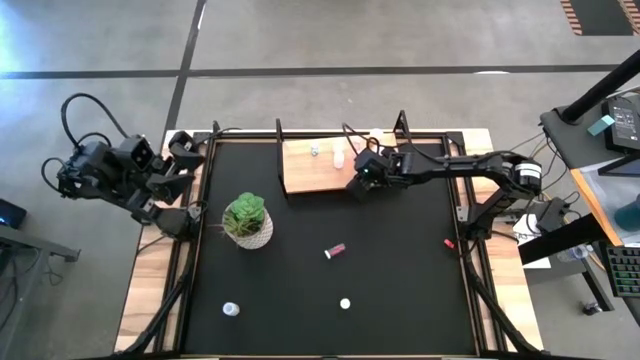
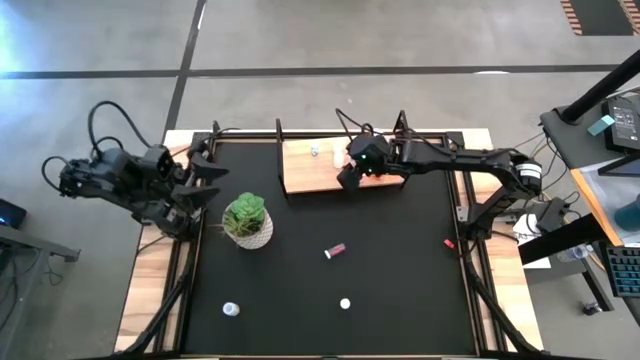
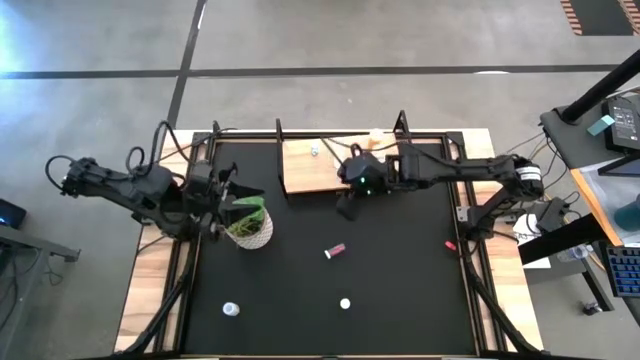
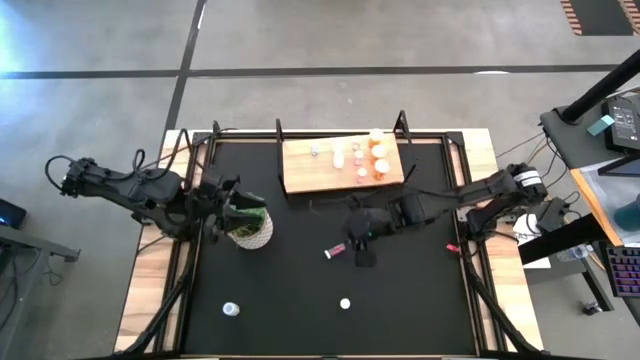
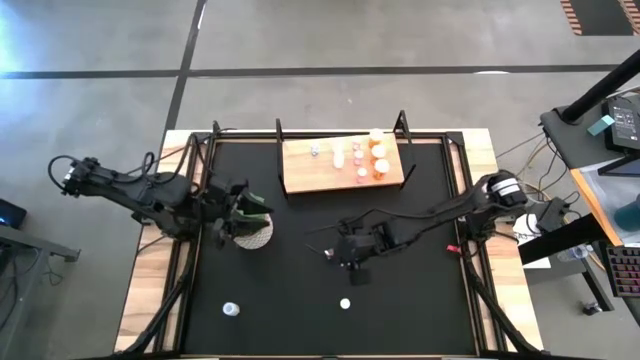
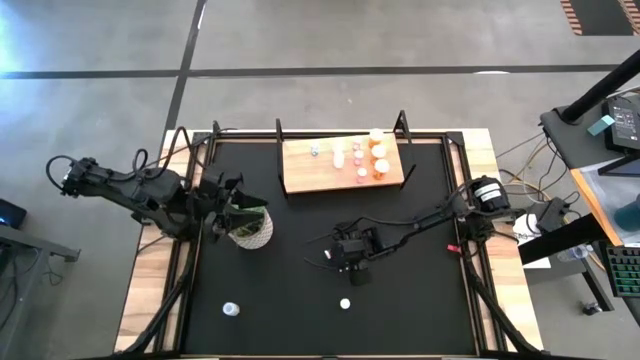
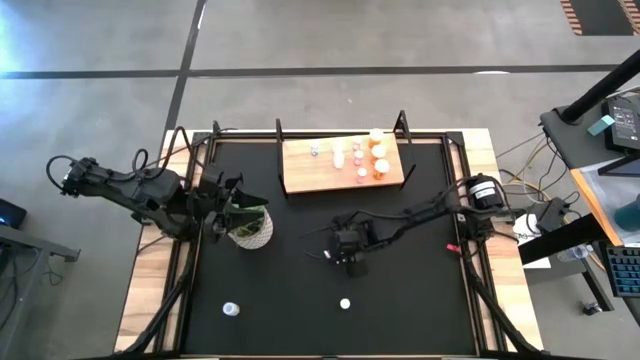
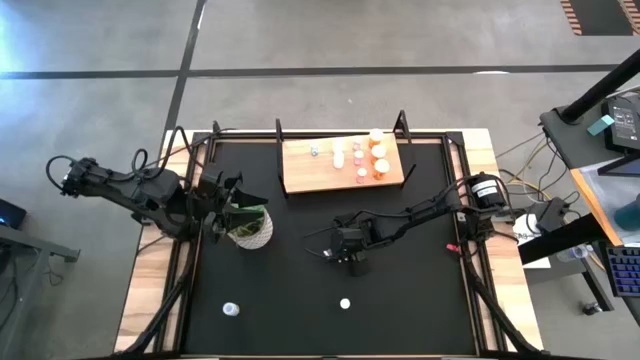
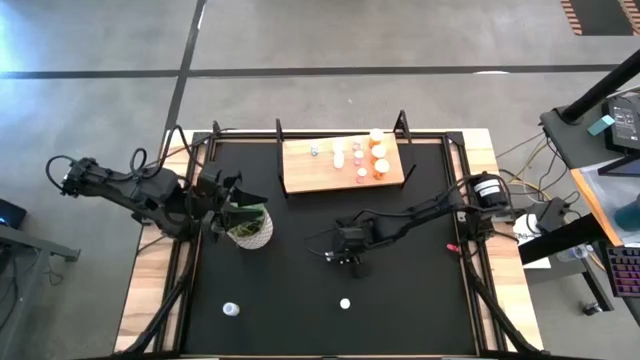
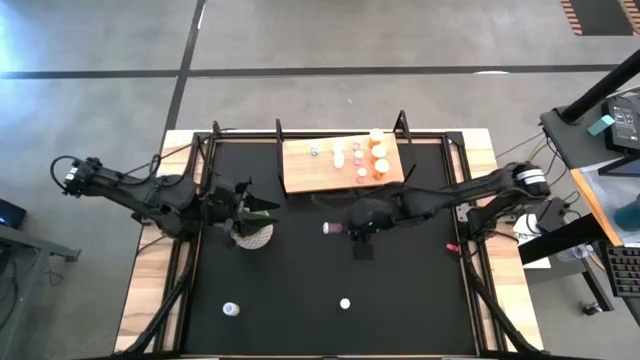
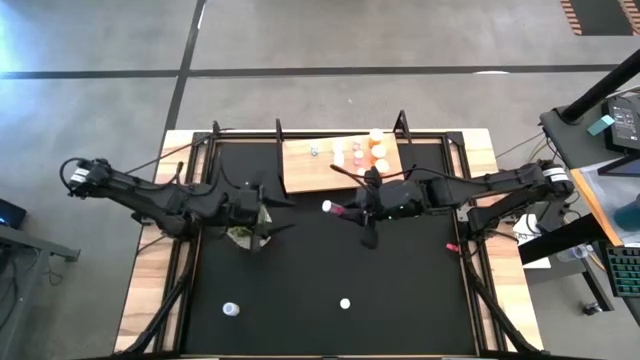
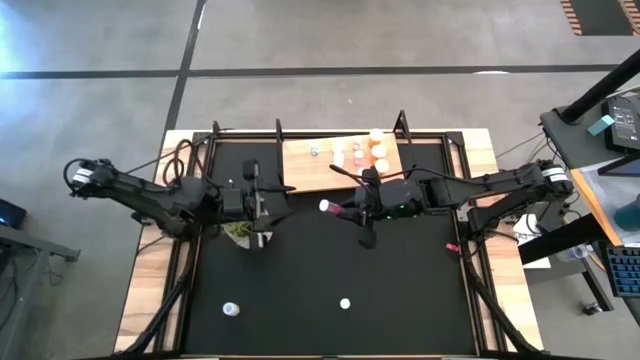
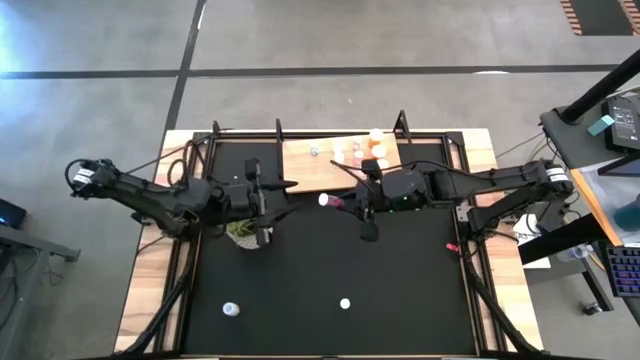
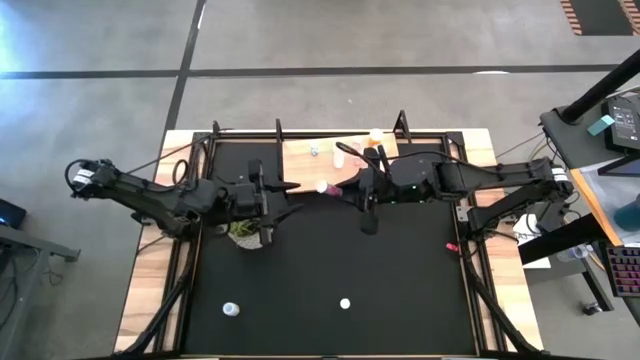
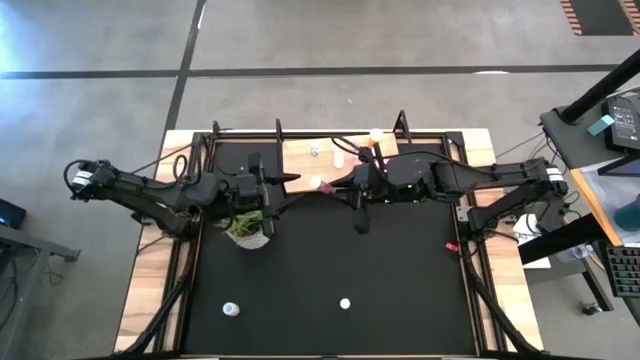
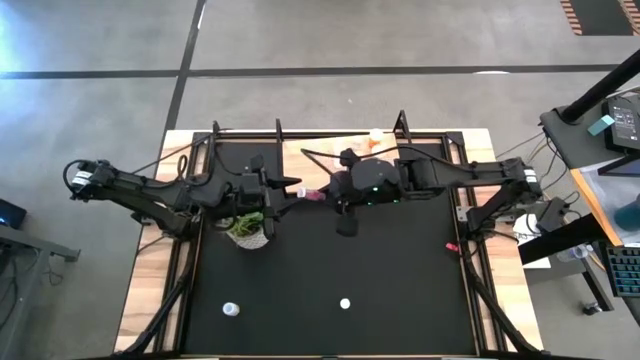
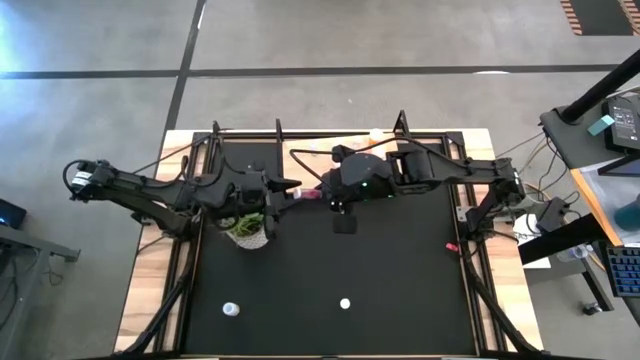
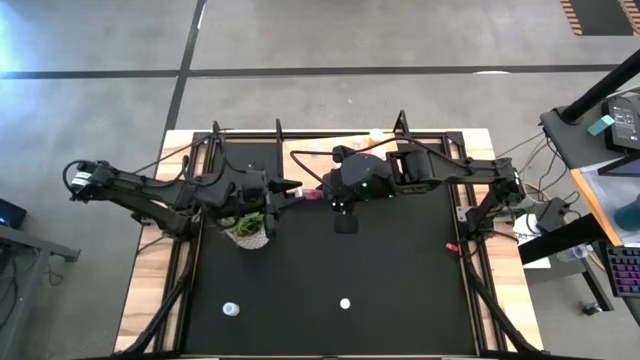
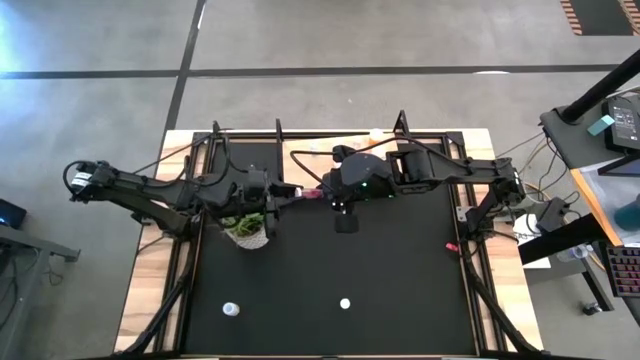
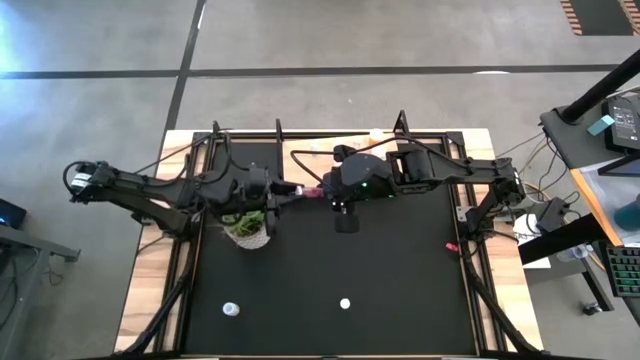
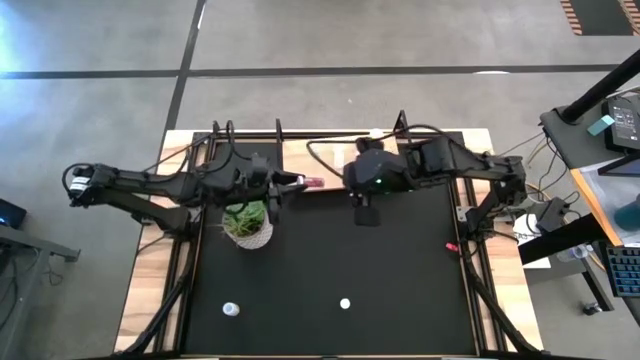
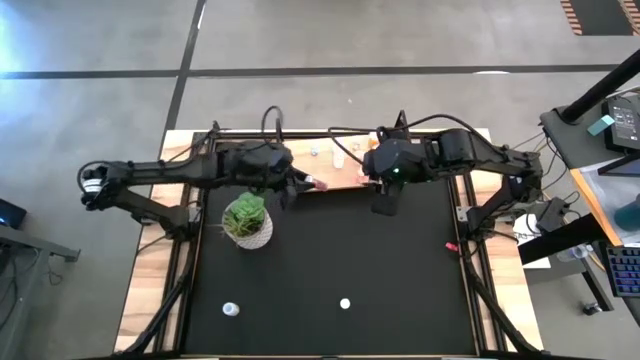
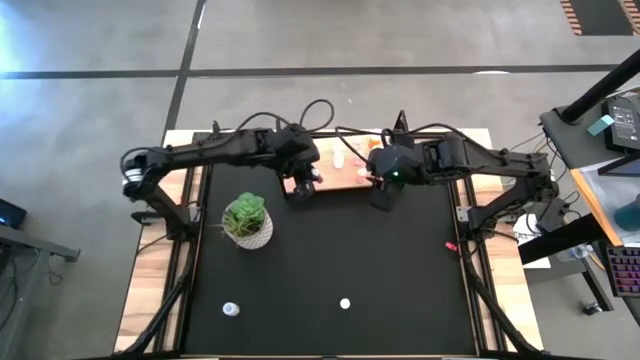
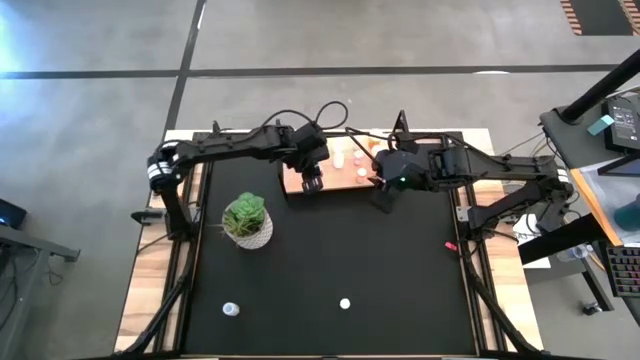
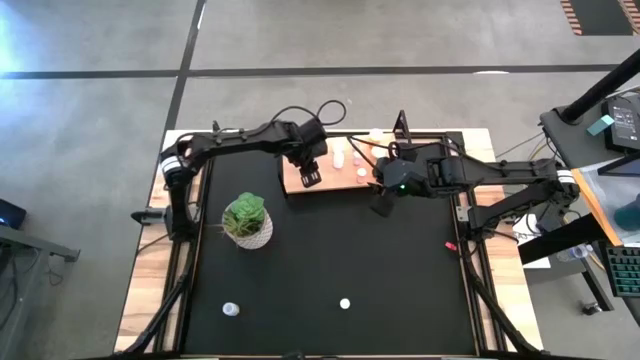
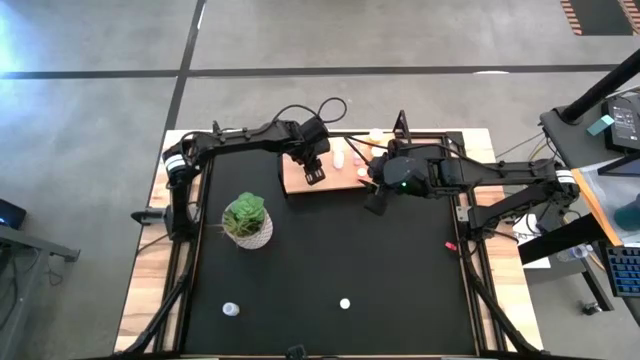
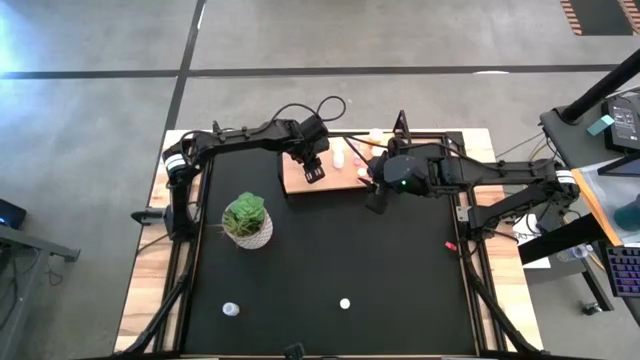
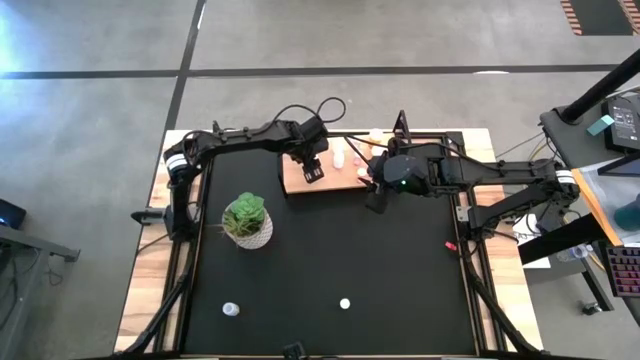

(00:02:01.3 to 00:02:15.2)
Task: Pick and place medicine bottles onto shelf by color
Put the top blue pill bottle on the shelf aligned with the other blue pill bottle

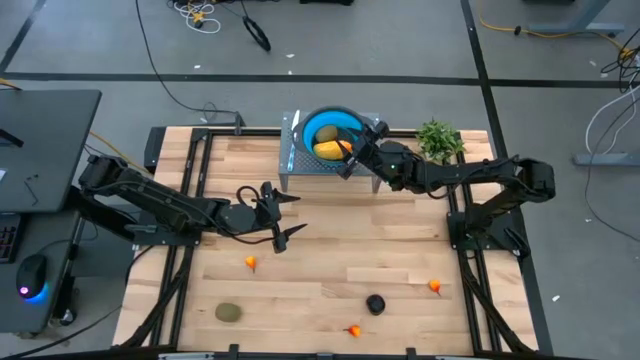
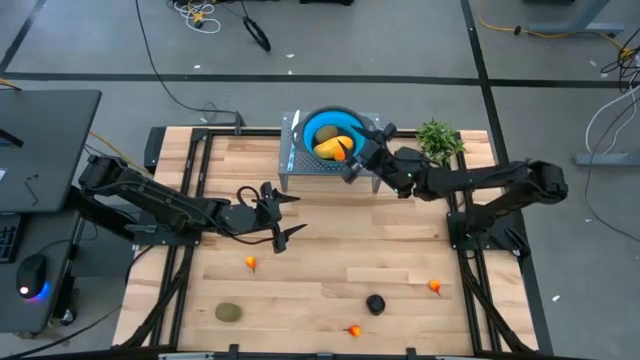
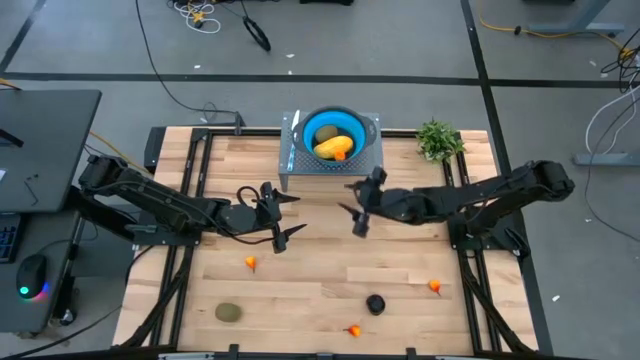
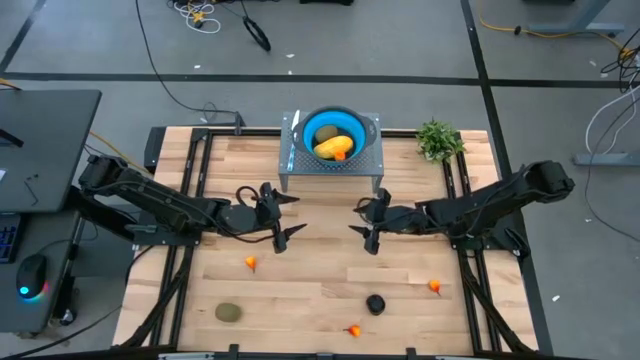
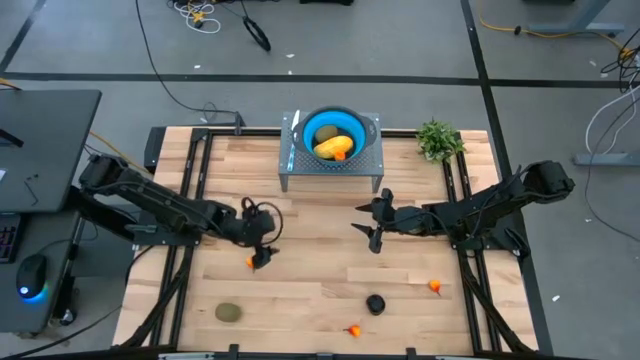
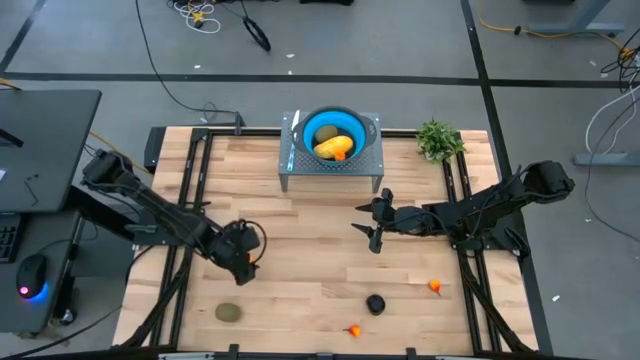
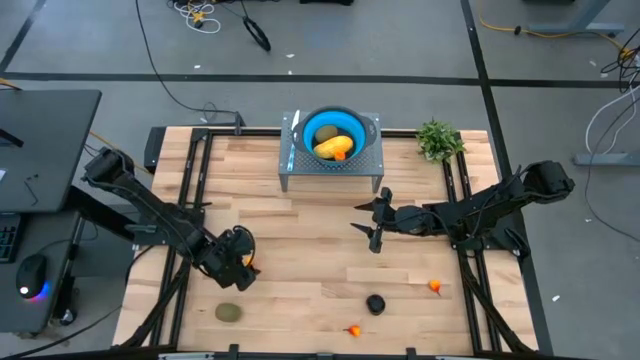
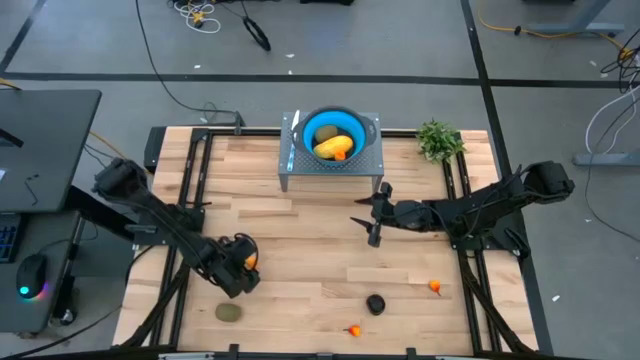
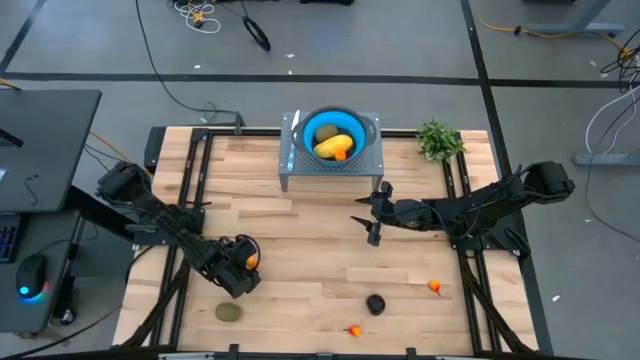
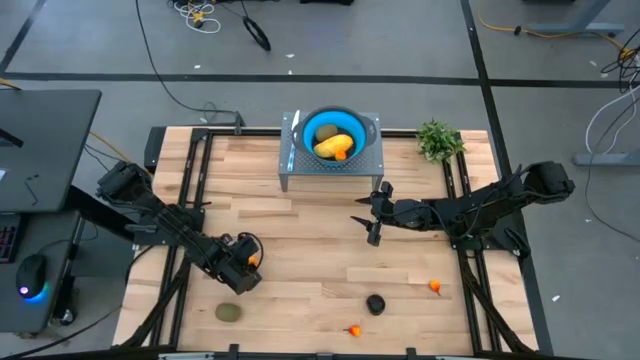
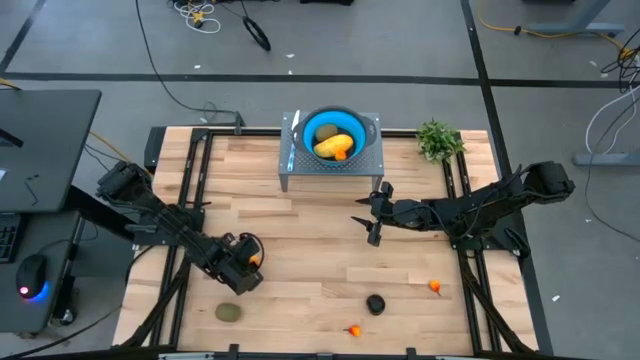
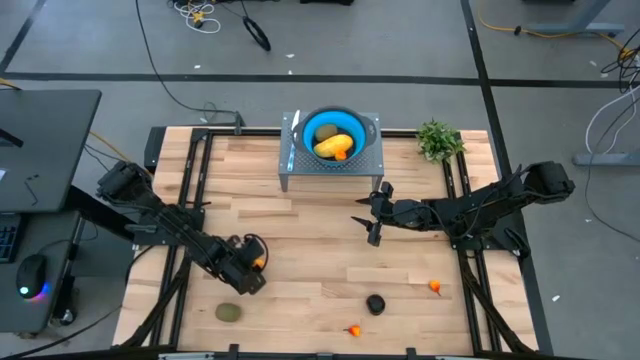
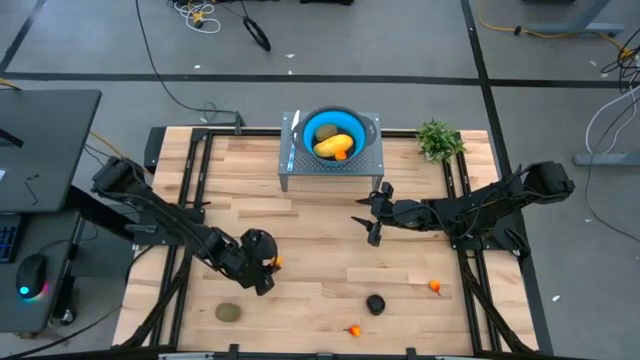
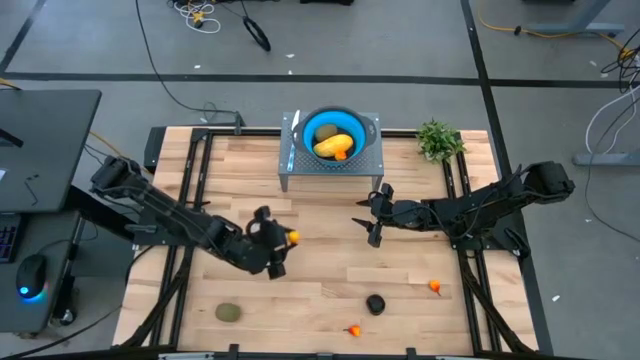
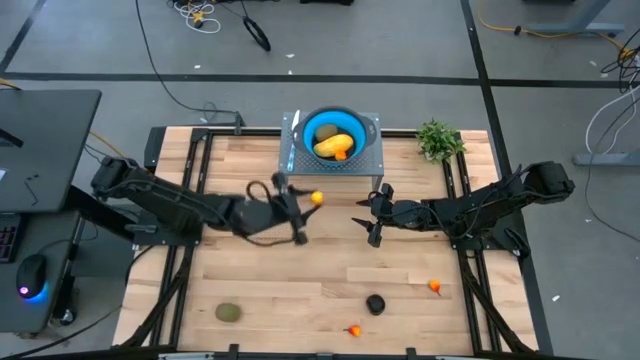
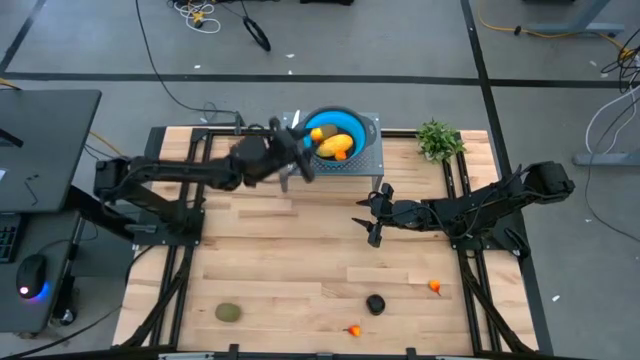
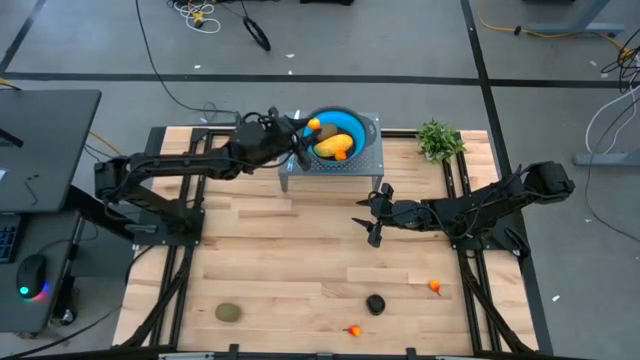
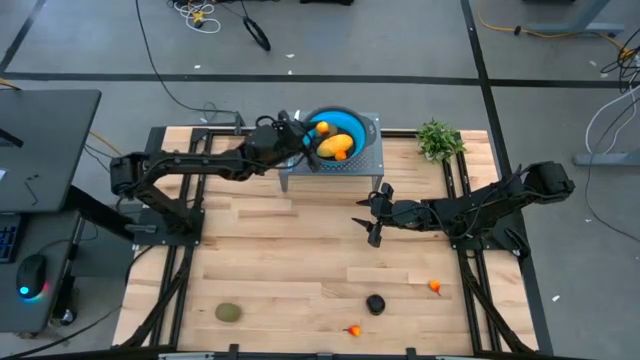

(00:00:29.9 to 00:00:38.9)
Task: Pick & Place Fruit
Put the orange pear into the blue strainer bowl
